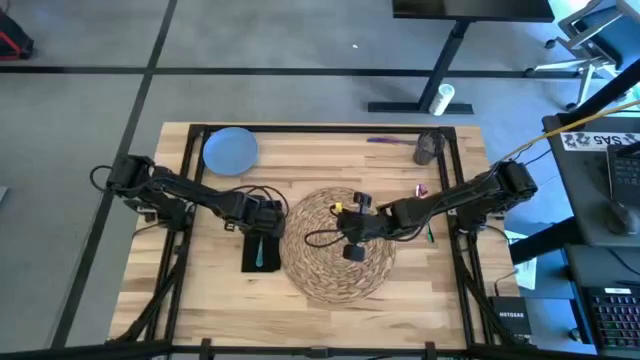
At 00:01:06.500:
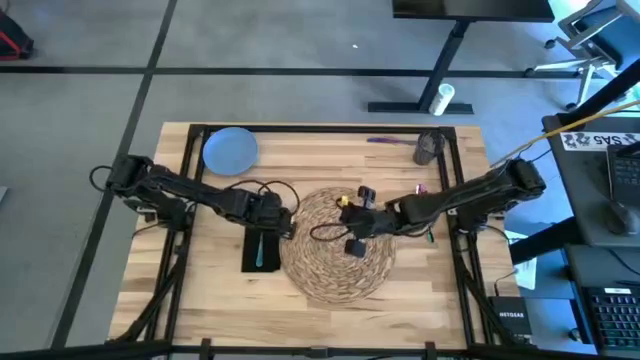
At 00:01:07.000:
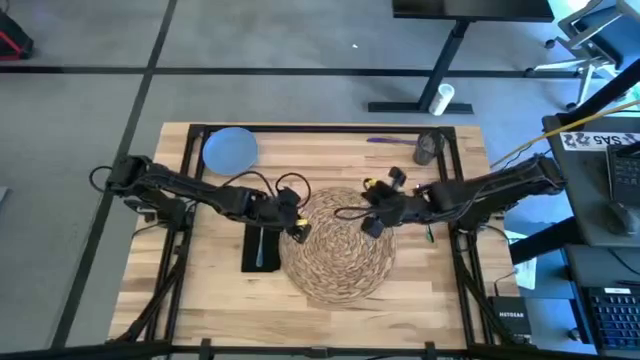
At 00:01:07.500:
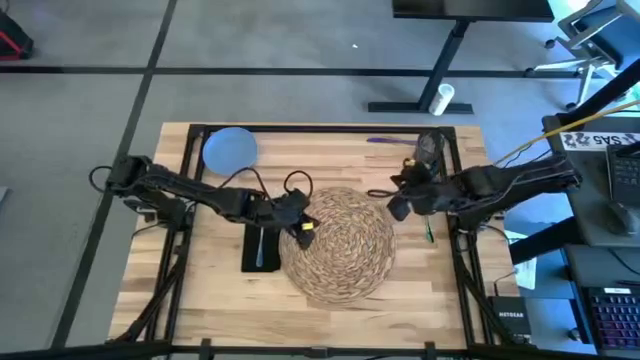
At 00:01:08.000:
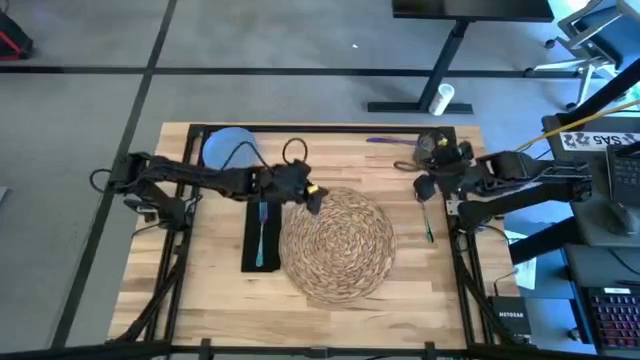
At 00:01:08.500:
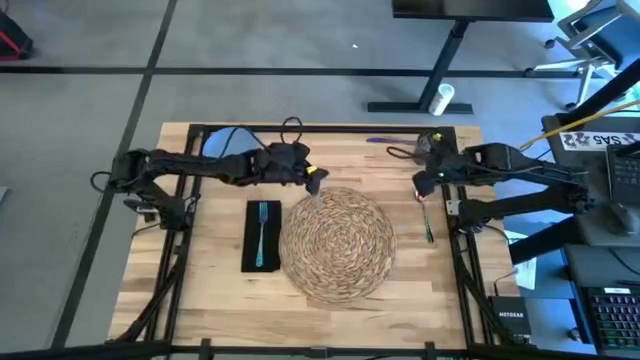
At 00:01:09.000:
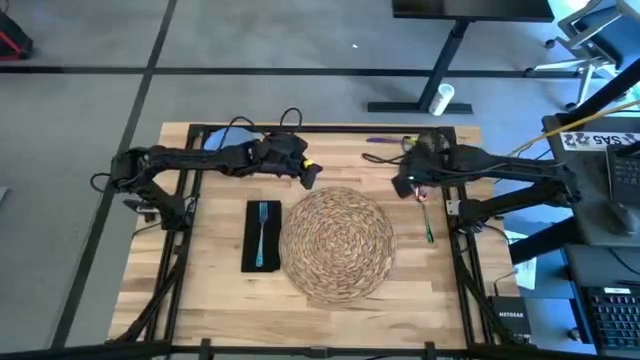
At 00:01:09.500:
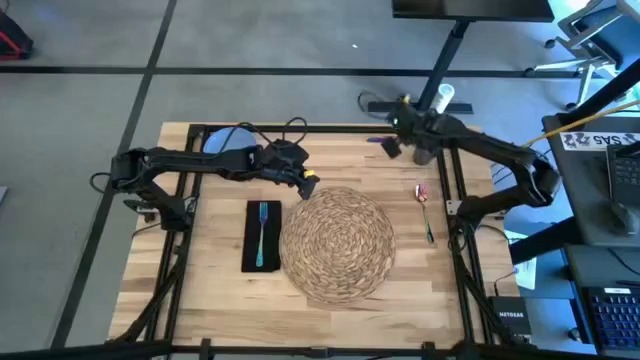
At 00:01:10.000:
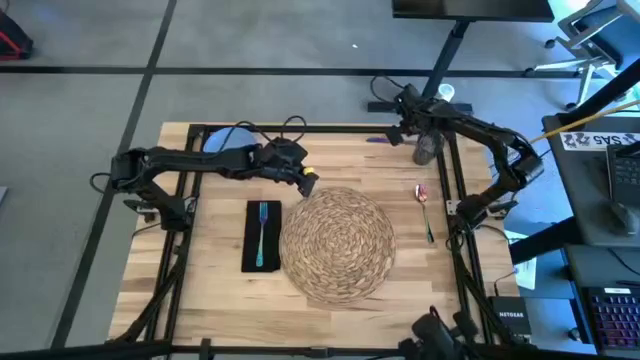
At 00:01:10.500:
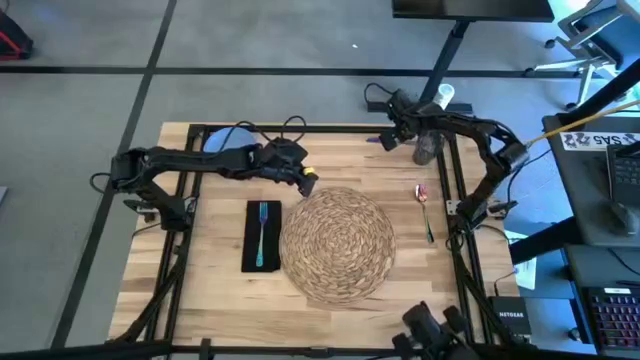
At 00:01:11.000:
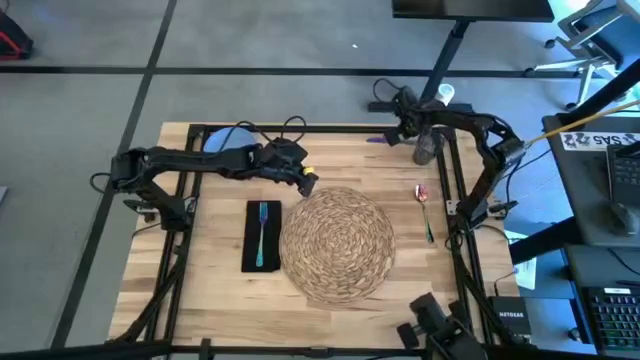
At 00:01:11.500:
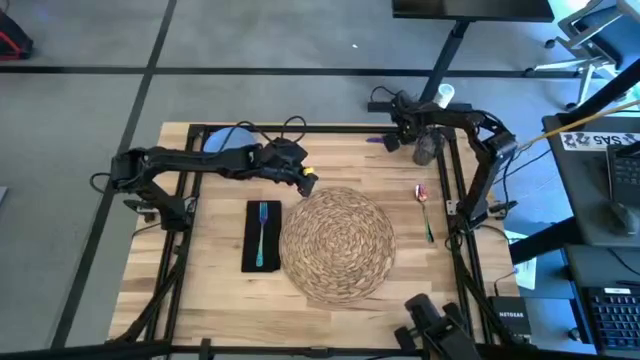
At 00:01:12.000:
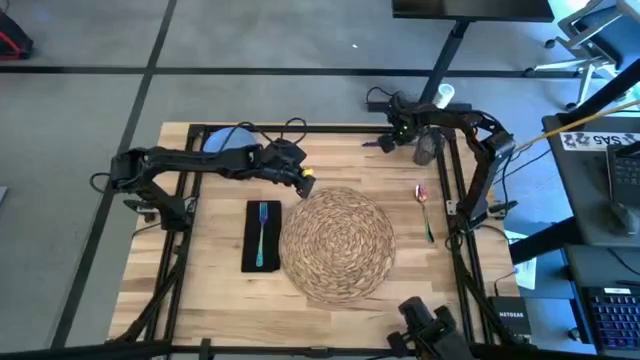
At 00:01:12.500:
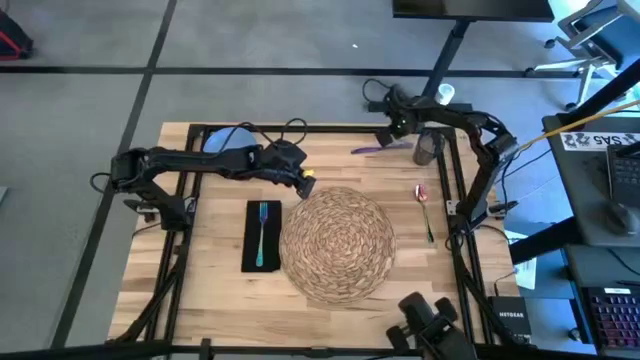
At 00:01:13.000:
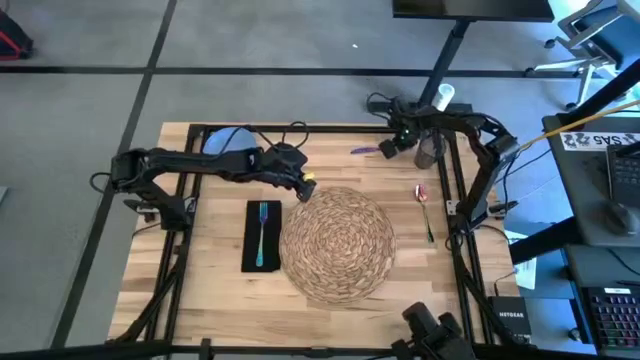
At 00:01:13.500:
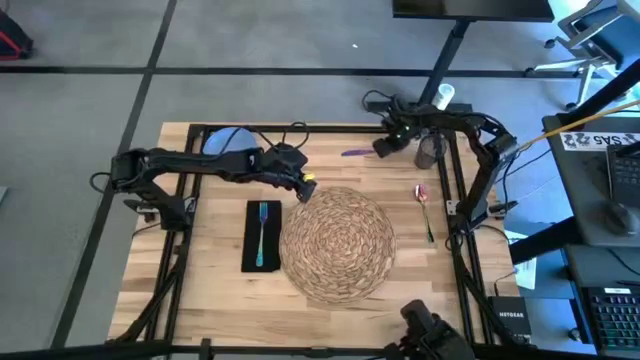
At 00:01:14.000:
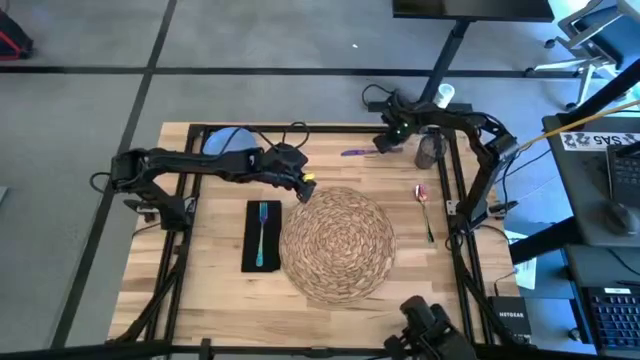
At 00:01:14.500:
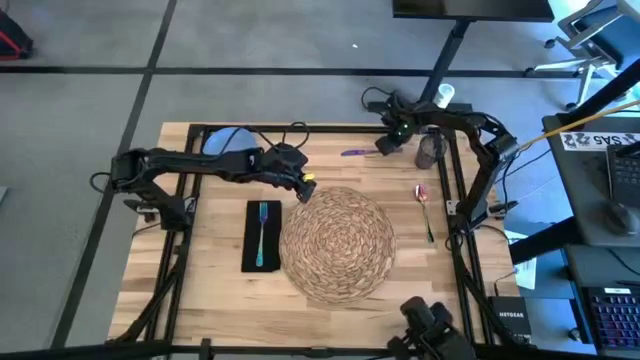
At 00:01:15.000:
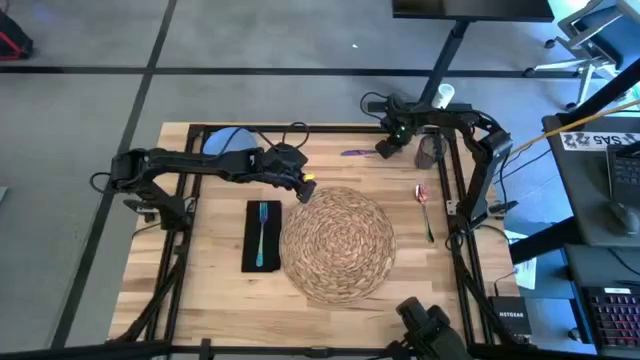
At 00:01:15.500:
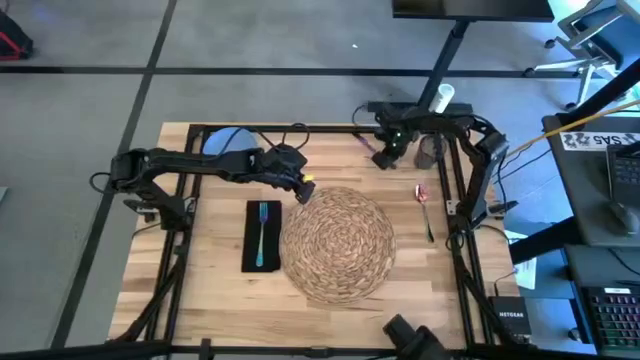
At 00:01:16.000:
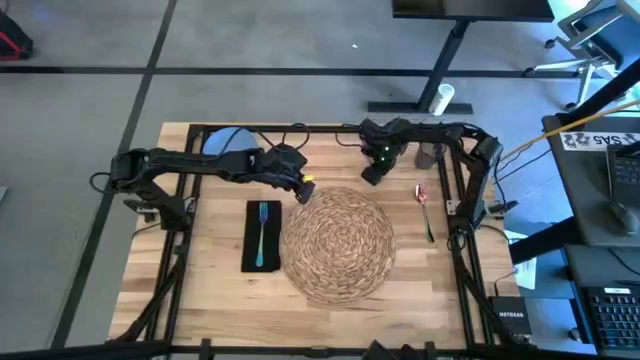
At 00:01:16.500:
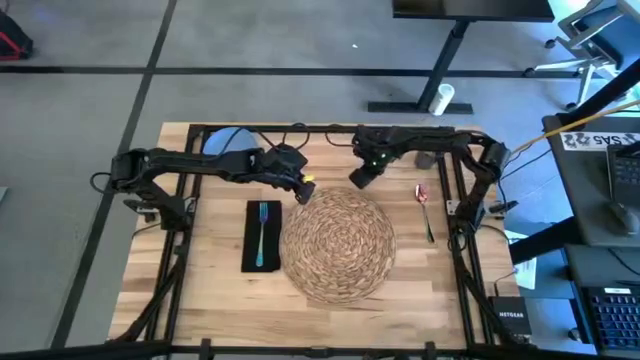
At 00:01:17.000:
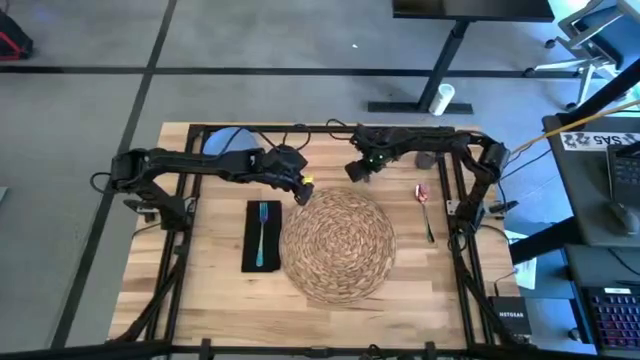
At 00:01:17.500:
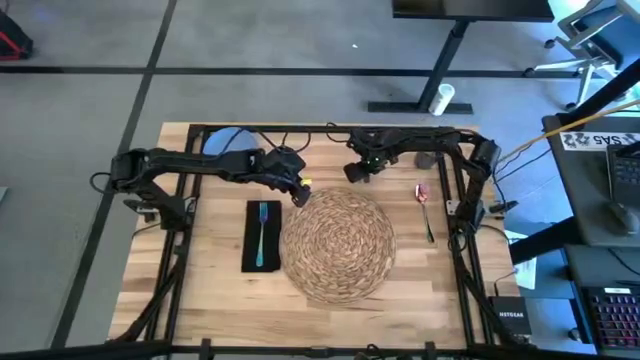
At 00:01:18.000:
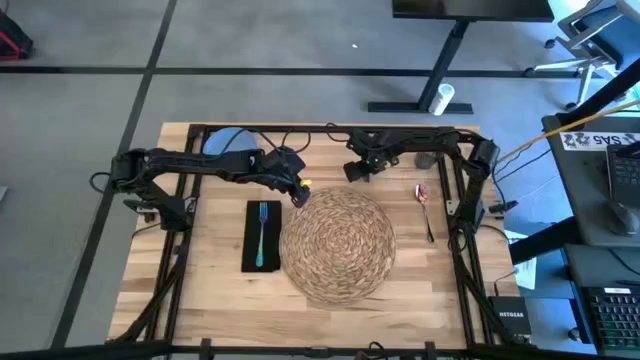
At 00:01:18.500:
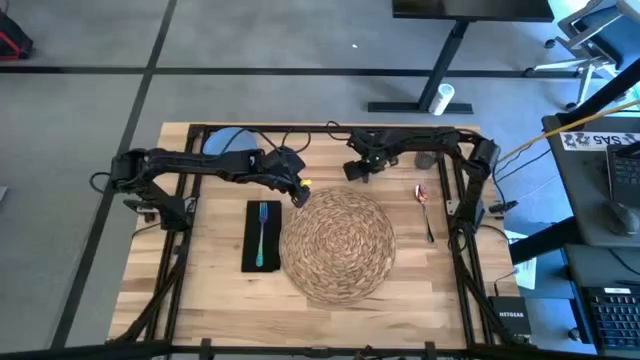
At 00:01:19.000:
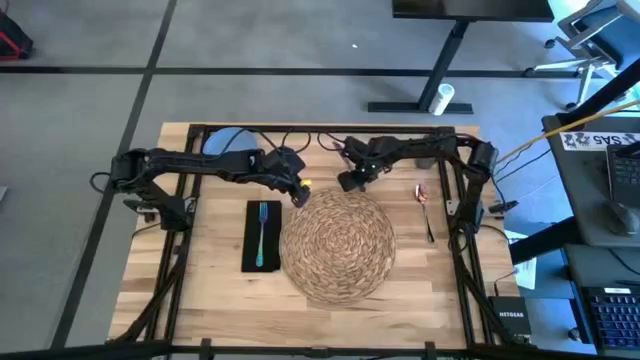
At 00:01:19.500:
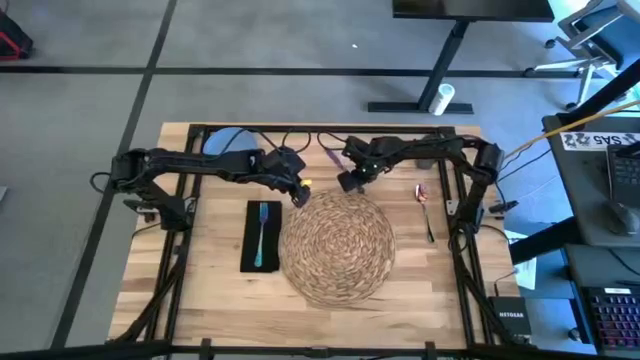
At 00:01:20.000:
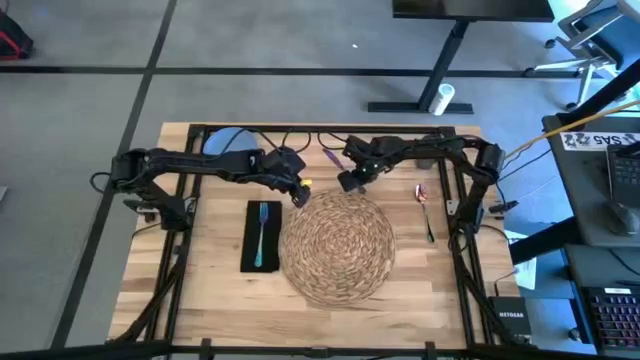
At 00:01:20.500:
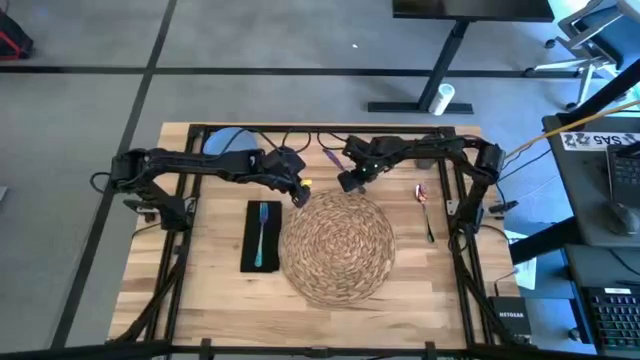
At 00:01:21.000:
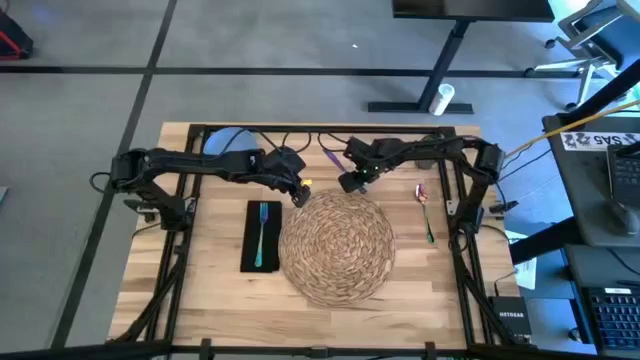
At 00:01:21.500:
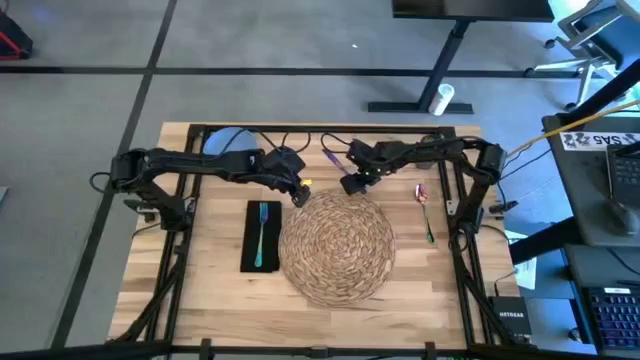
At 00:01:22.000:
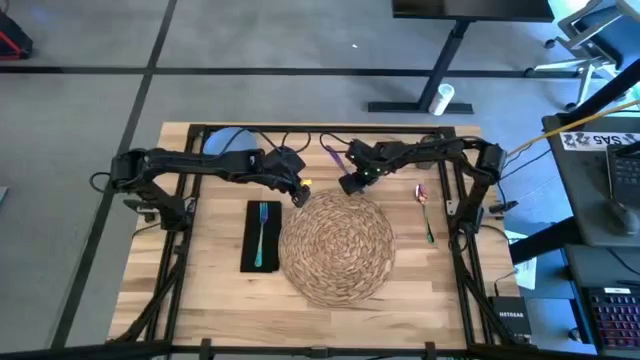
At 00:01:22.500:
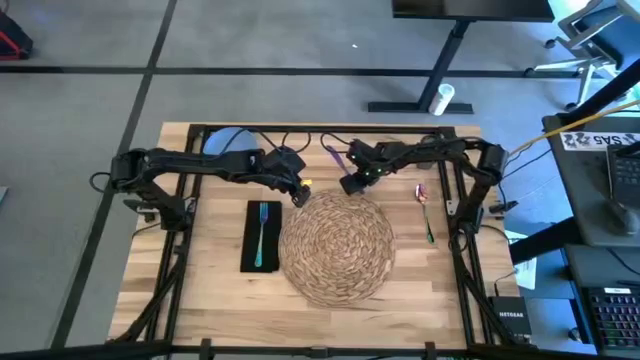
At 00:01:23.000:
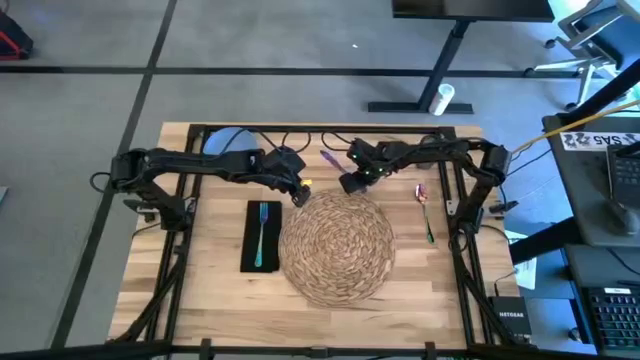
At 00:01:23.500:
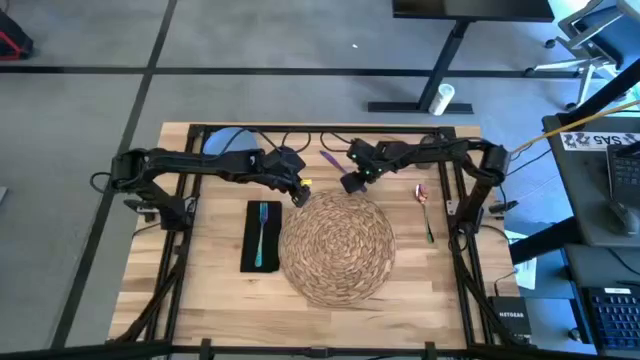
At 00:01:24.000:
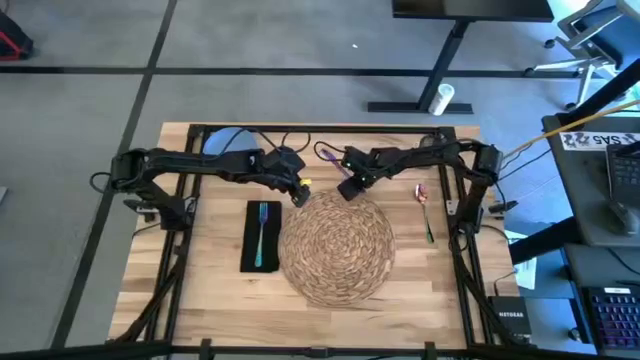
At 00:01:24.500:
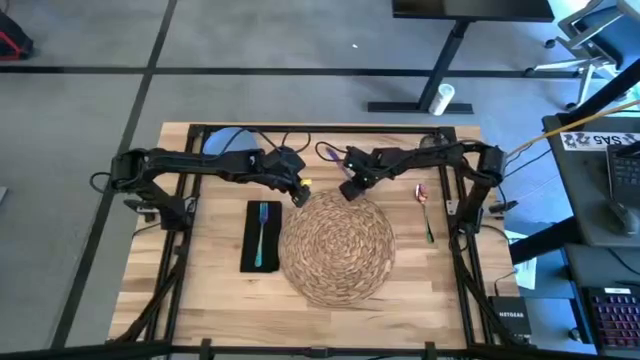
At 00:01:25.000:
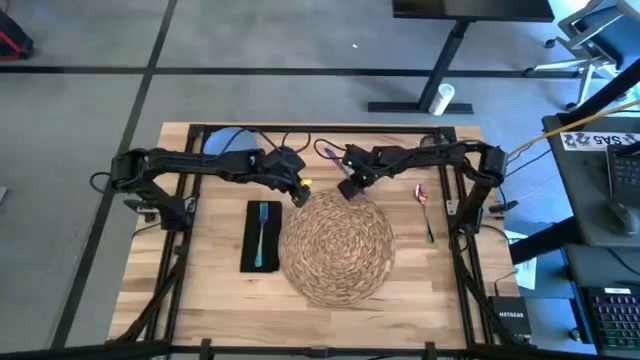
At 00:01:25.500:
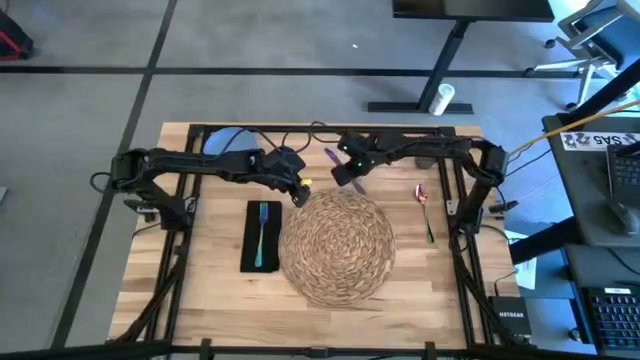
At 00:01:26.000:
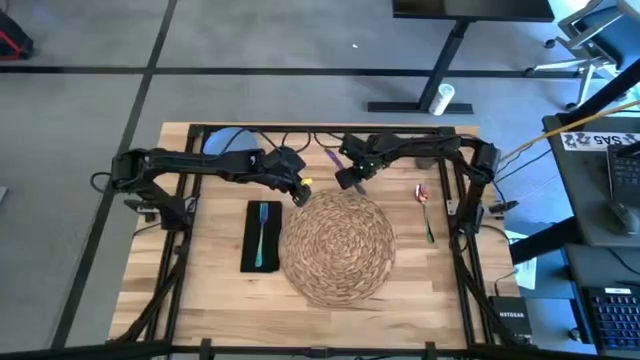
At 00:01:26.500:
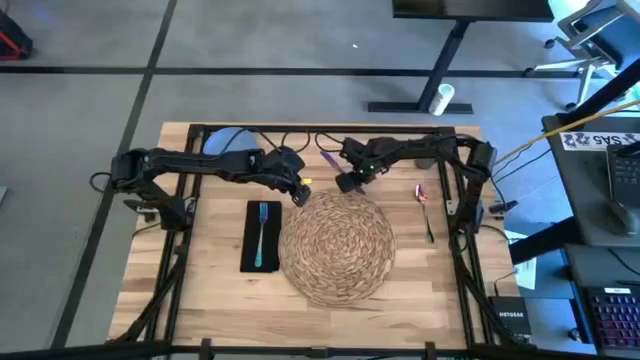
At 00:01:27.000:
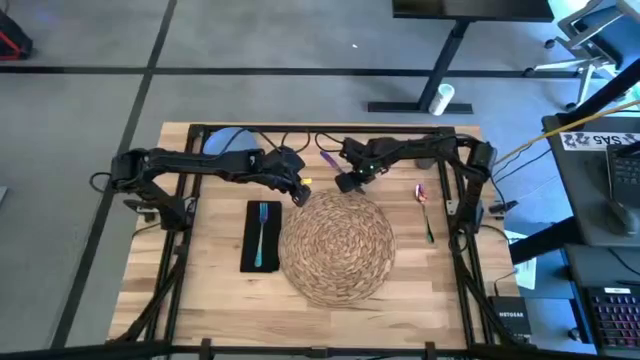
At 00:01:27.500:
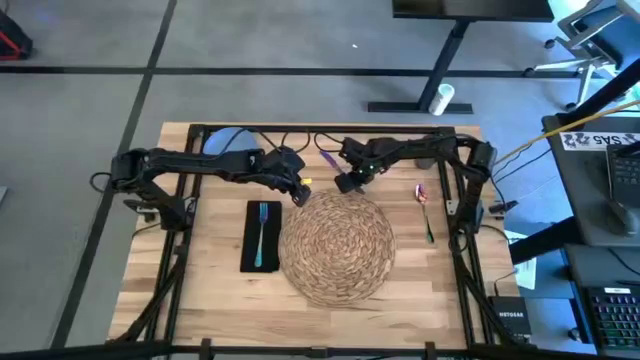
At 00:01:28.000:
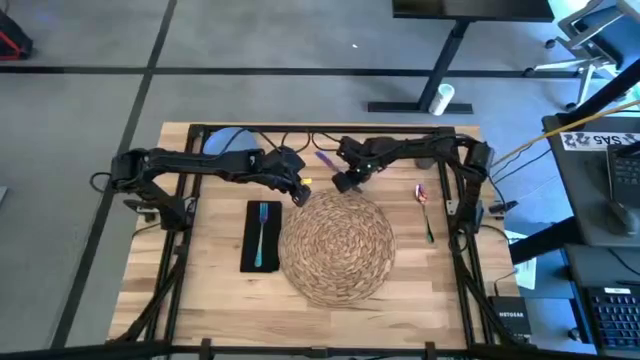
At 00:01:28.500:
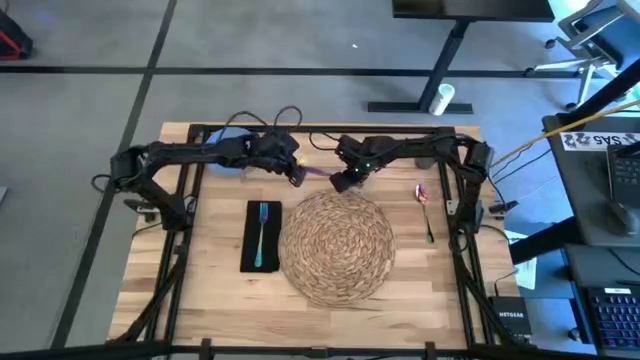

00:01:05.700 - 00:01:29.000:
Task: Set table place
Put the blue table knife on top of the brown placemat
